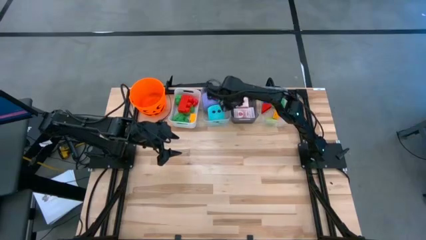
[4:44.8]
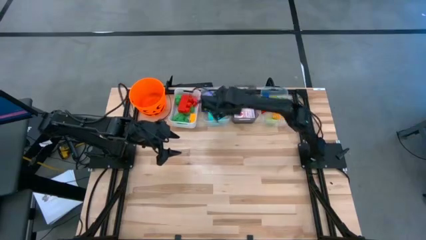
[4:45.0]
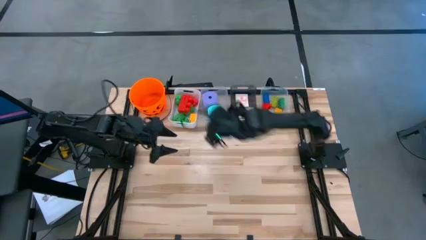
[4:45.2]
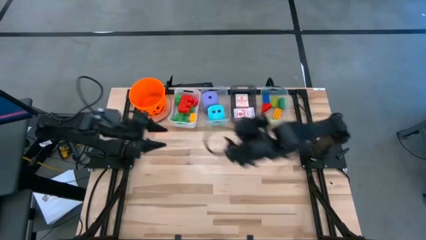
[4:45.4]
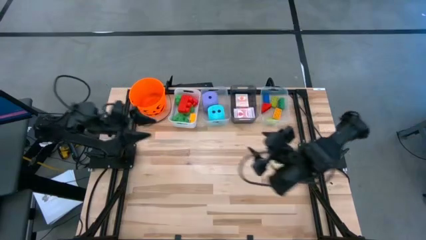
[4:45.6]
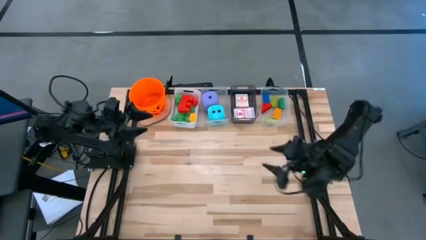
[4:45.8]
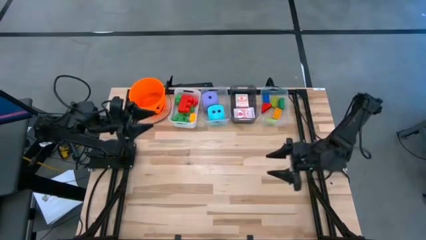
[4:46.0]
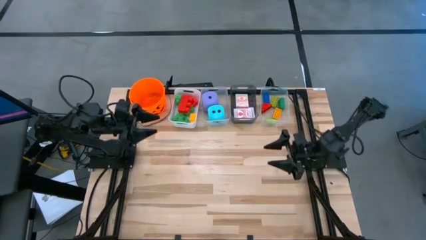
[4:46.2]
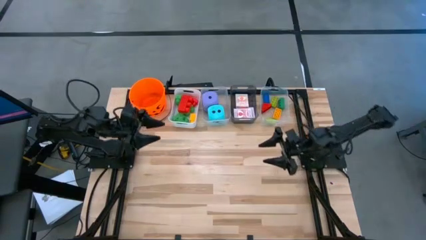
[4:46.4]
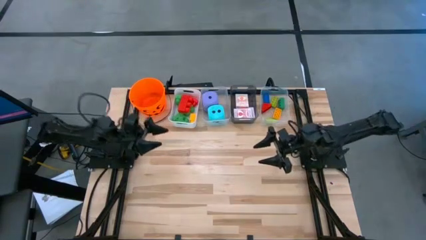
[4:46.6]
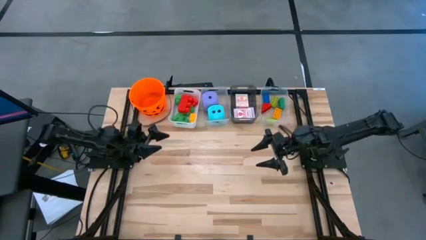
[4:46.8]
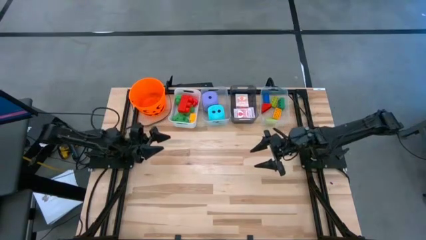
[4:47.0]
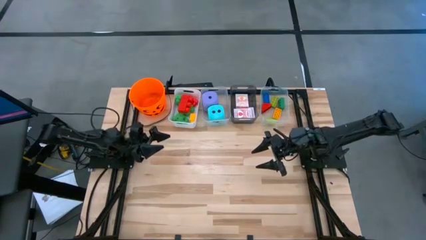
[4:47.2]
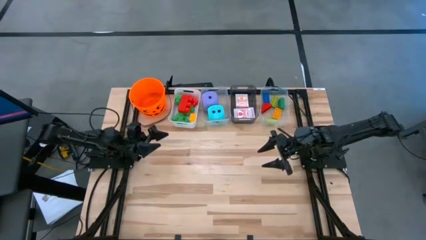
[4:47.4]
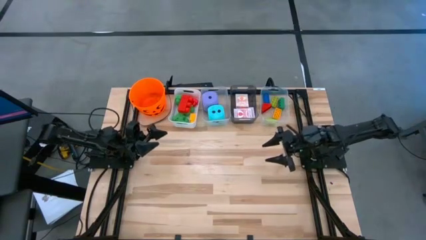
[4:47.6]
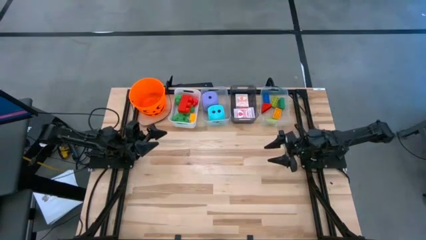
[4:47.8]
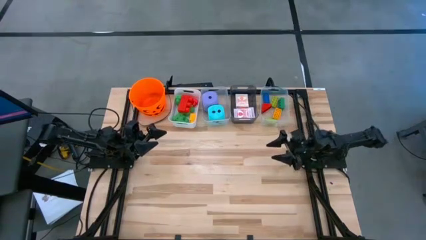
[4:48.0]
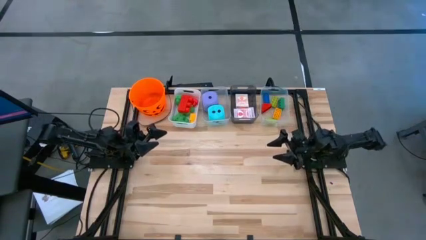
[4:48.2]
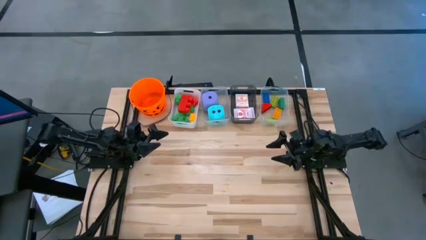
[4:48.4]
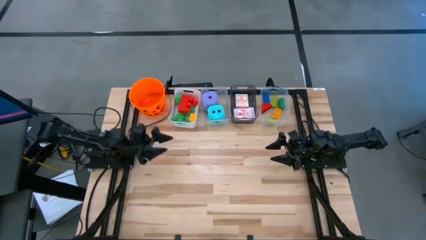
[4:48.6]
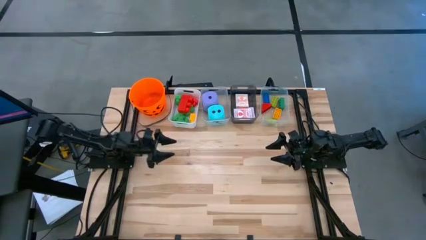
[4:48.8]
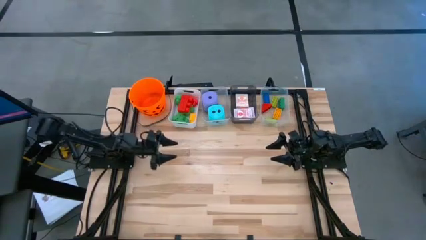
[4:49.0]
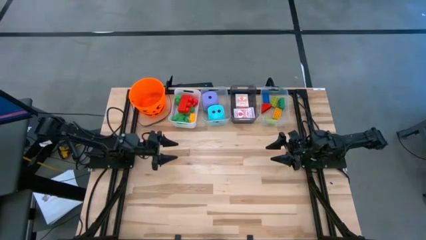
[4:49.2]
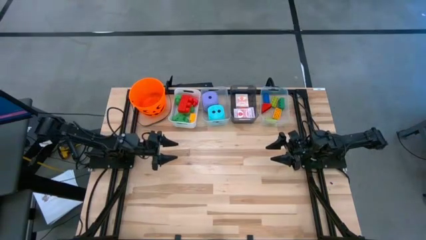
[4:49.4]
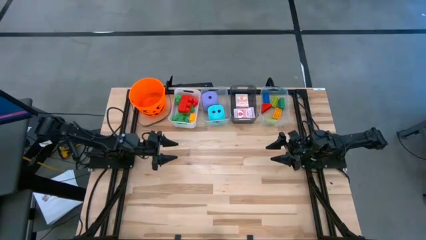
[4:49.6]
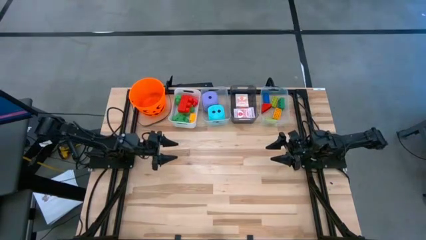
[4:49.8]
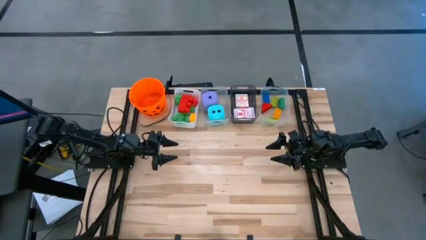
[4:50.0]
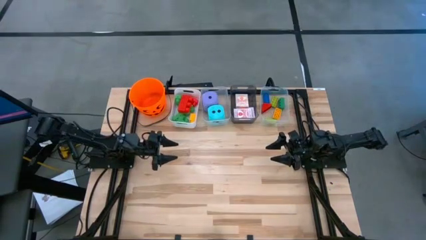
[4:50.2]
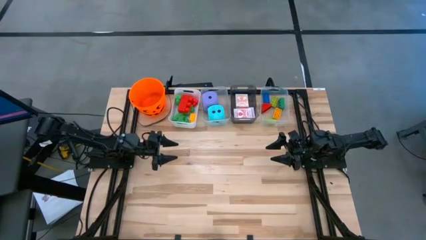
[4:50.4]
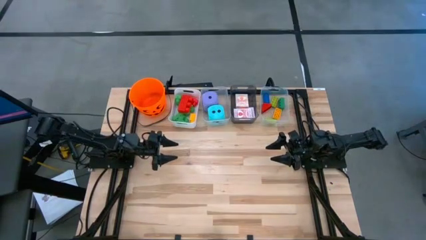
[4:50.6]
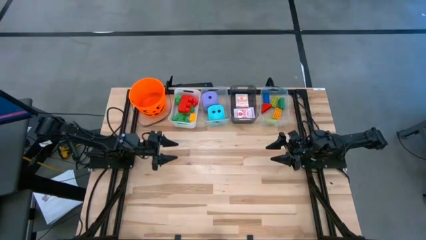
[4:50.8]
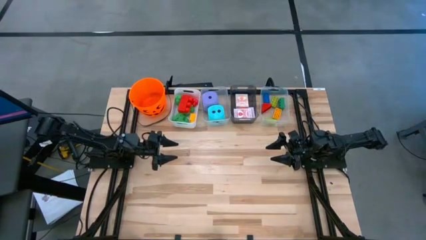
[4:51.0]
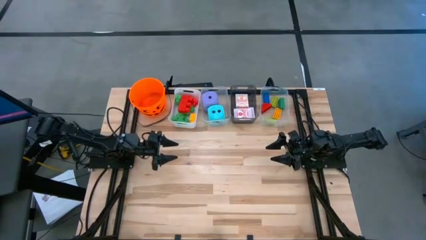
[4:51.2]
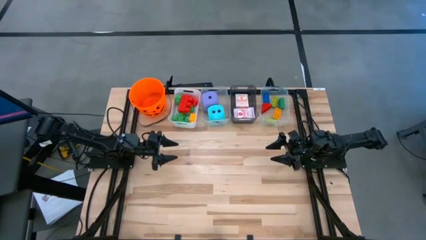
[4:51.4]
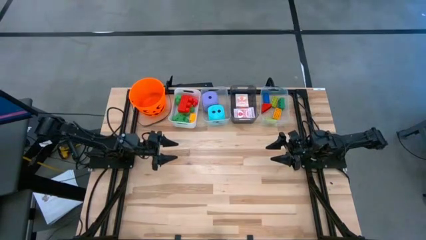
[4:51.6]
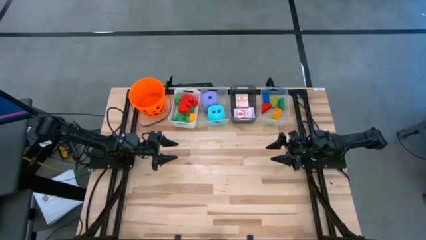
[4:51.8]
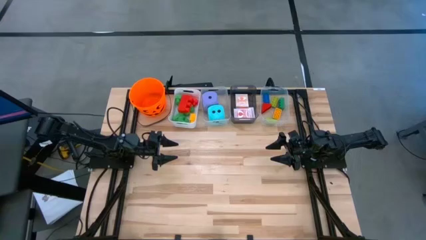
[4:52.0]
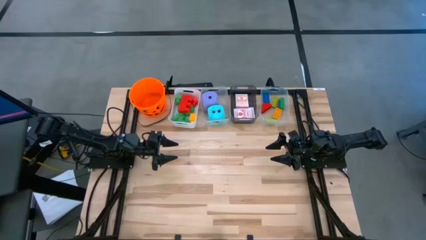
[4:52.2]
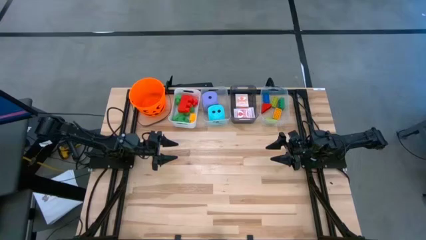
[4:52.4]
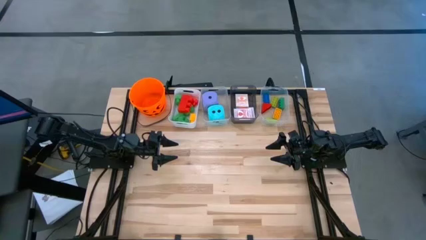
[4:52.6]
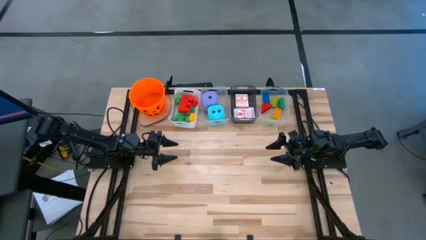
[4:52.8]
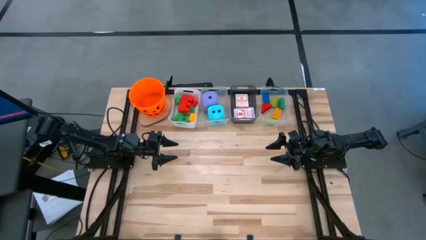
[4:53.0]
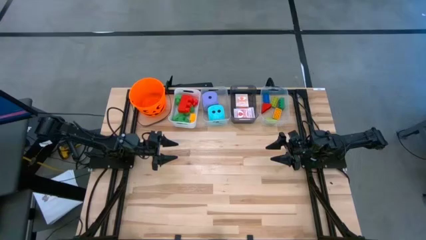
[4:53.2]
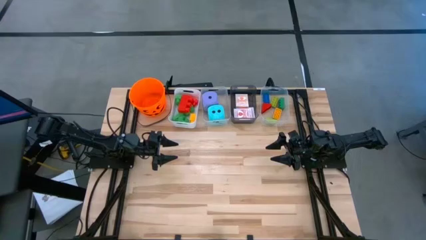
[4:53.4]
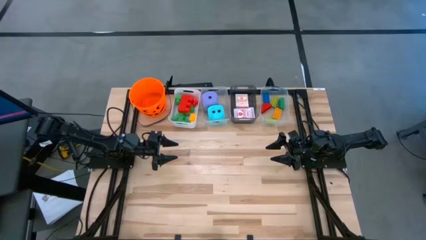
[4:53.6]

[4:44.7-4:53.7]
Task: Pick & Place Toys
Return to Home Position

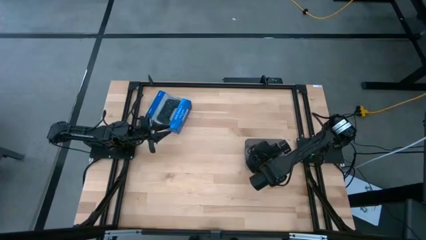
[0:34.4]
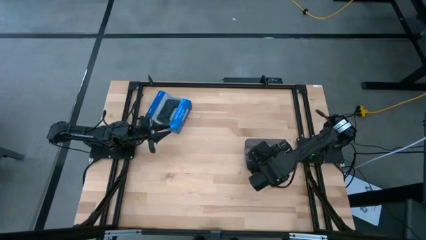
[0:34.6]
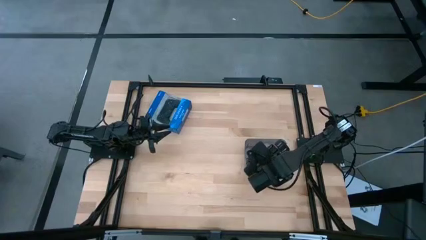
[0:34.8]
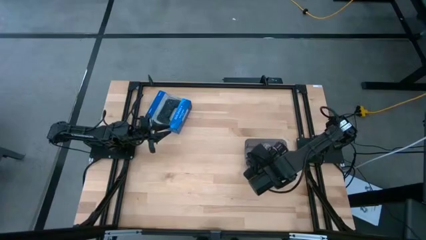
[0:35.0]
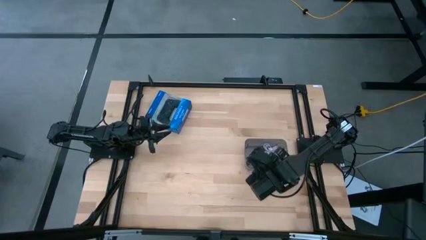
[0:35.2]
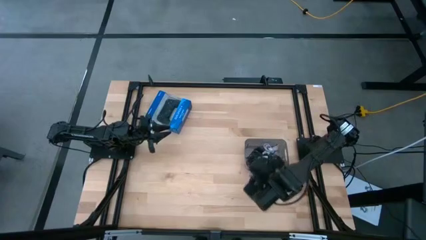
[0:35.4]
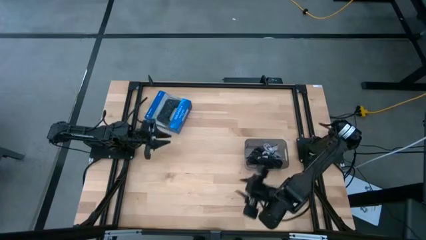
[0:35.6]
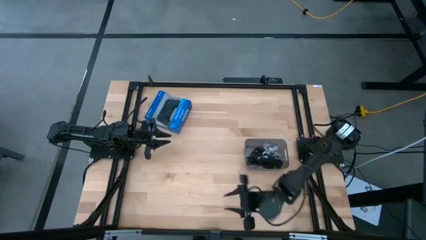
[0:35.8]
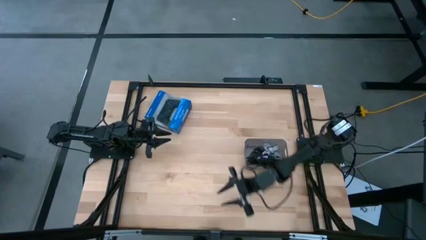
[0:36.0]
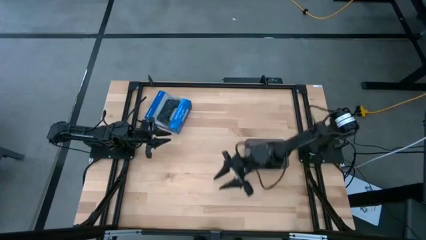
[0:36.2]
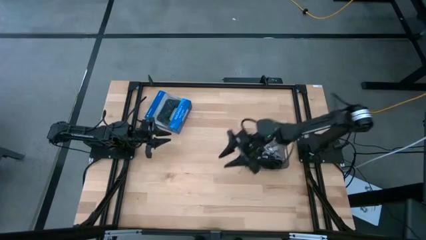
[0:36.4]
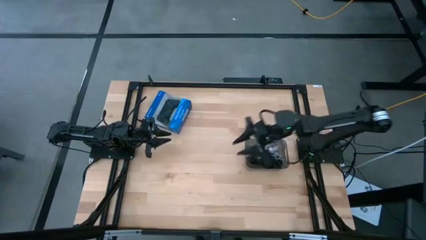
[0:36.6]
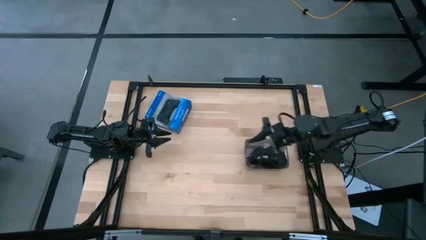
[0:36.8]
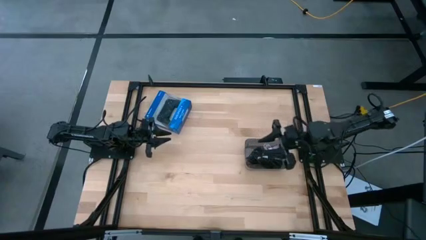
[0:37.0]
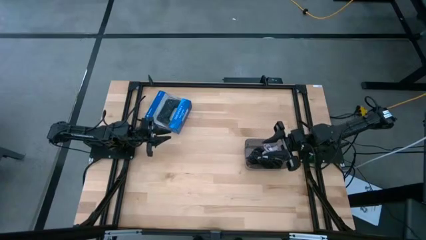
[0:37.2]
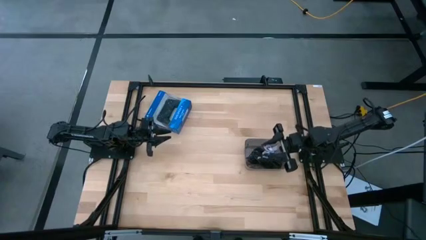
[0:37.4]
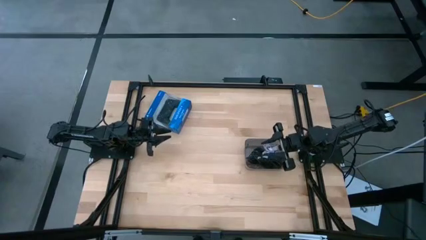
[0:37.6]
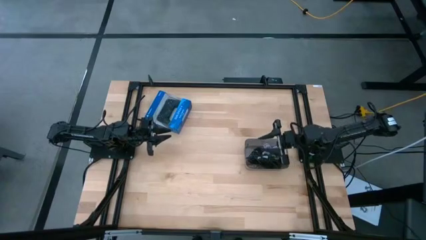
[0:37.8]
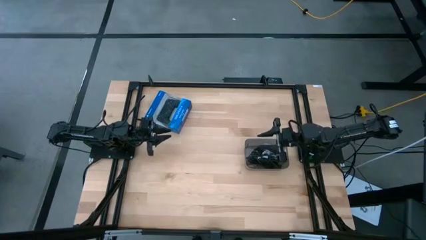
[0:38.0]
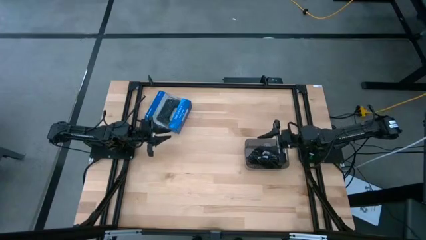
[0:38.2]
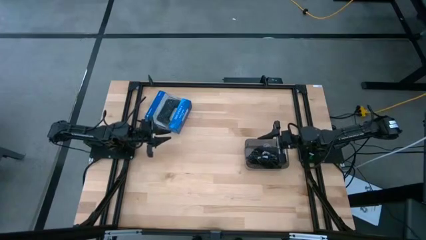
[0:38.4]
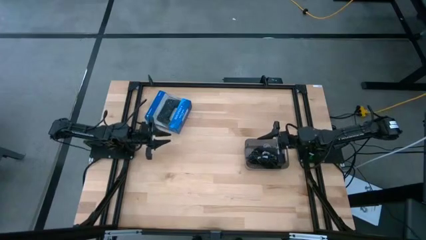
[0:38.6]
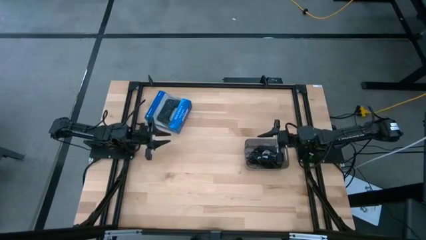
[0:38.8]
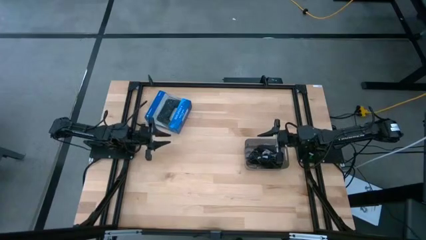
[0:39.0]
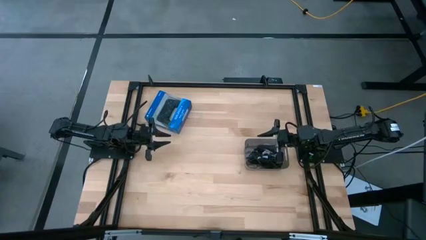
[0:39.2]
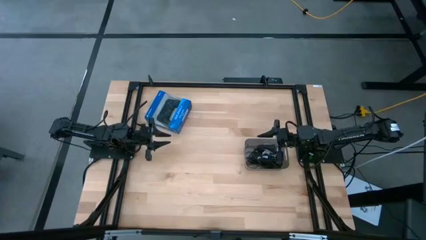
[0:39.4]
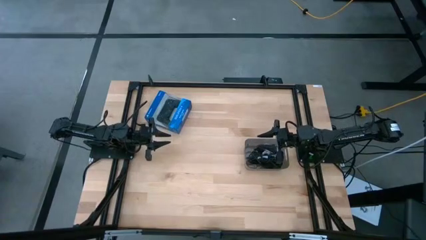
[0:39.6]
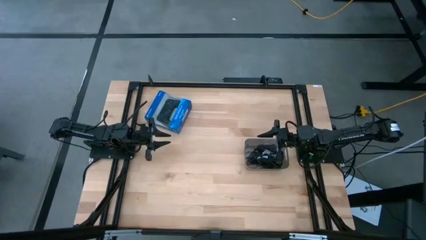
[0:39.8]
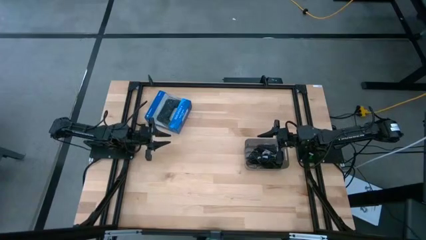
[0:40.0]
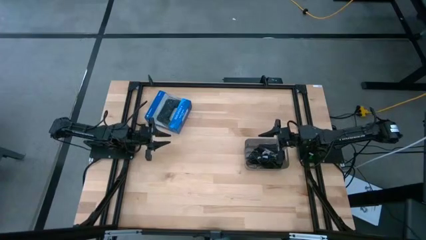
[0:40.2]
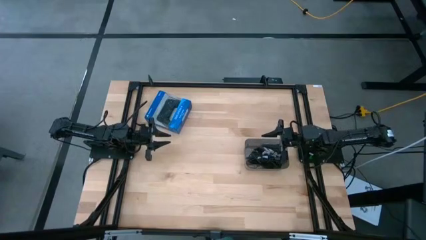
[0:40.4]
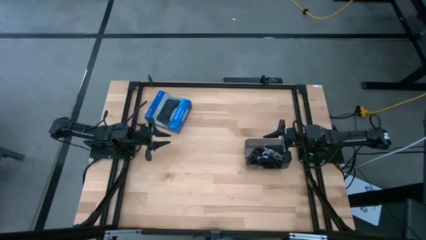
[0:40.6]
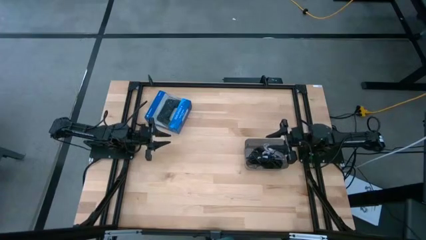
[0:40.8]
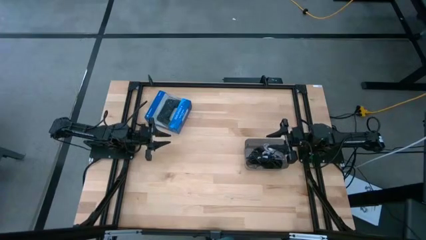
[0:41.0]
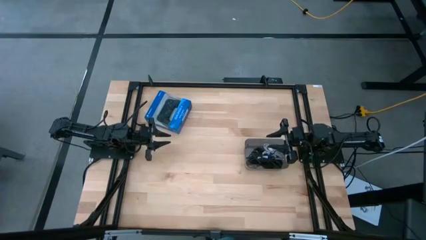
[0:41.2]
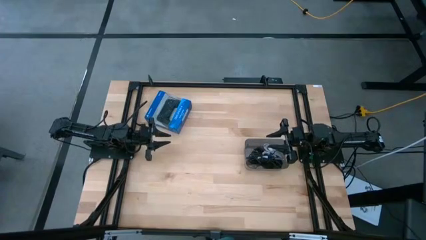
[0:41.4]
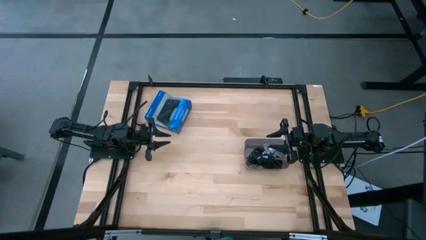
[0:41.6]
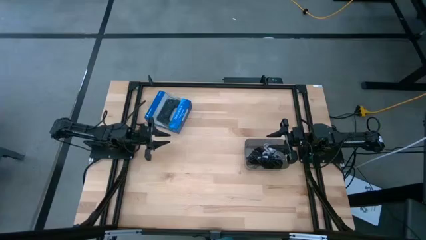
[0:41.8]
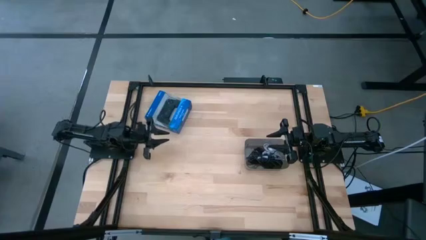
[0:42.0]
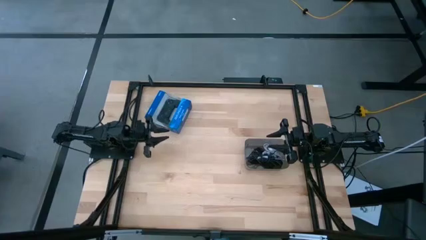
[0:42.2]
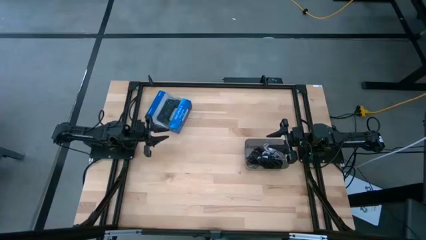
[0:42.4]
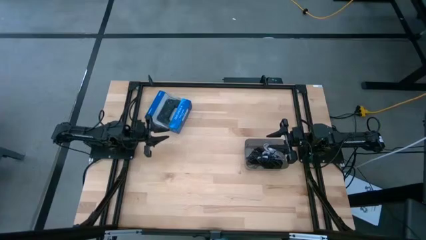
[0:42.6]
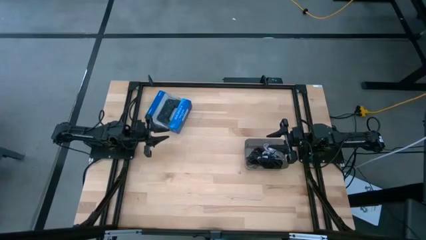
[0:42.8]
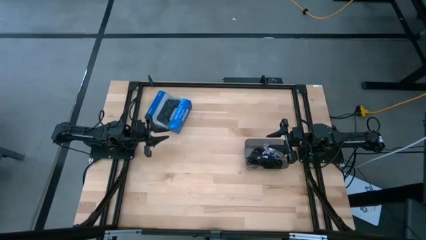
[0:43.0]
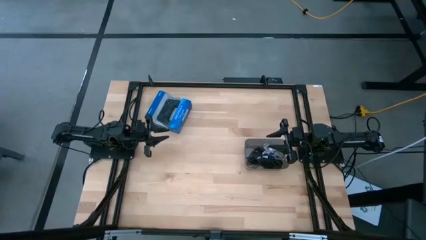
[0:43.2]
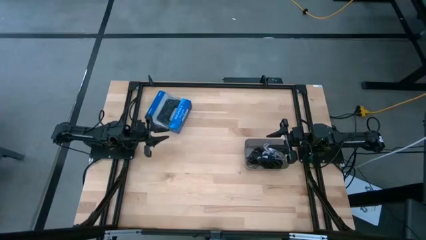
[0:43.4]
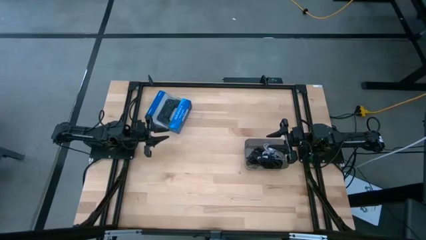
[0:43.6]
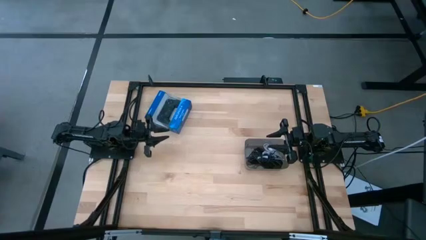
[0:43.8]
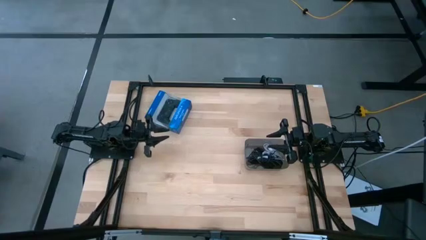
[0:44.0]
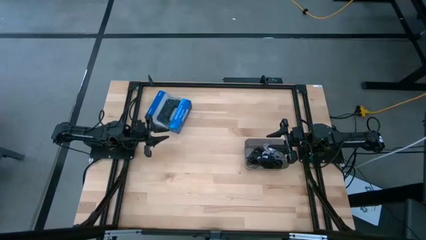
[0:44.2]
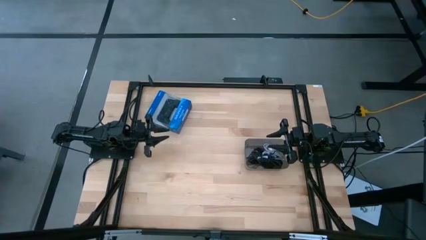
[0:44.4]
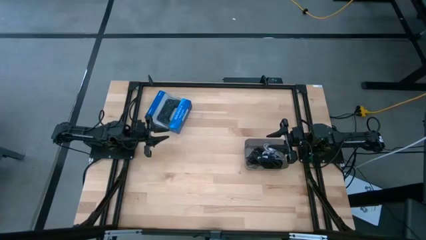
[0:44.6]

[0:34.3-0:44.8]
Task: Pick and place USB-C Cables
Return to Home Position
